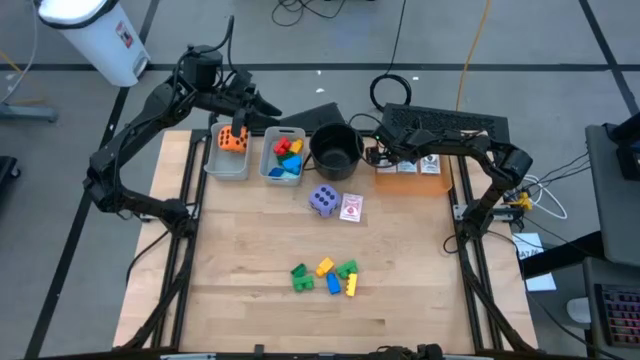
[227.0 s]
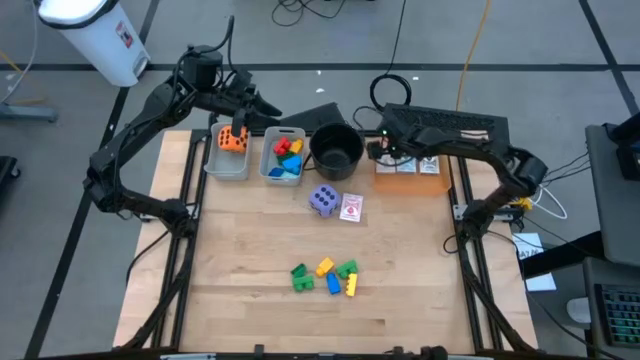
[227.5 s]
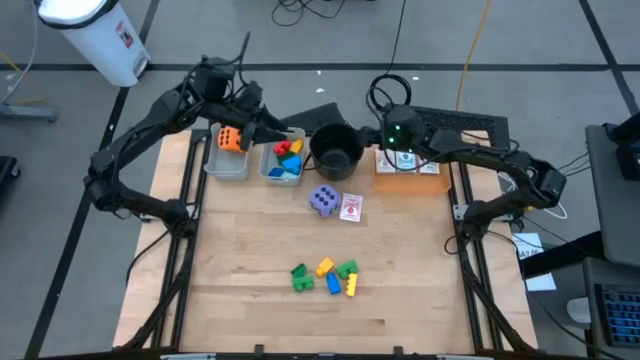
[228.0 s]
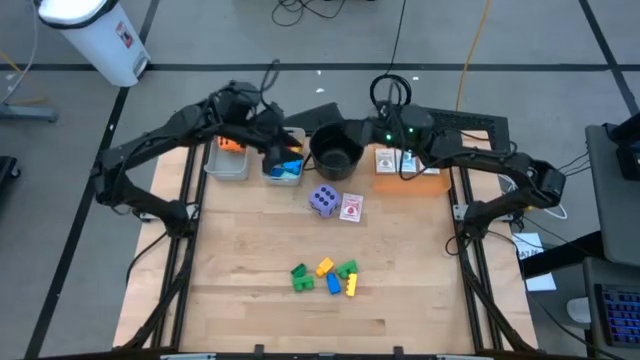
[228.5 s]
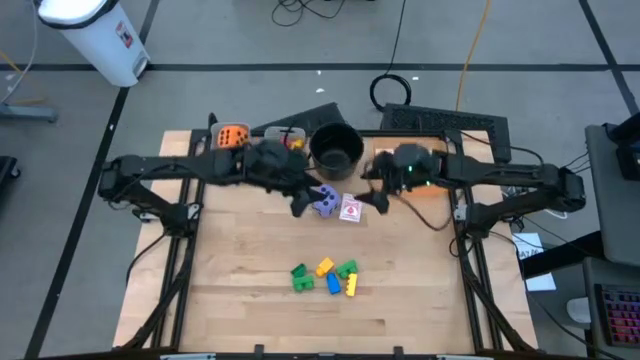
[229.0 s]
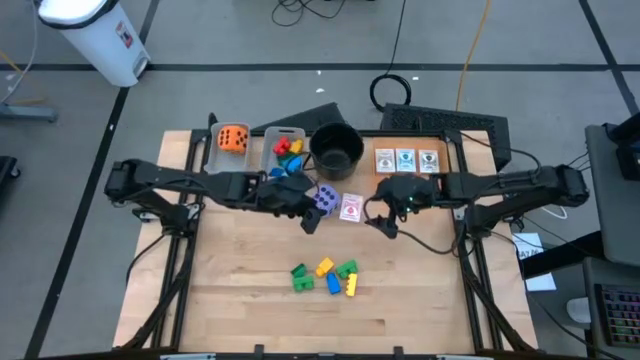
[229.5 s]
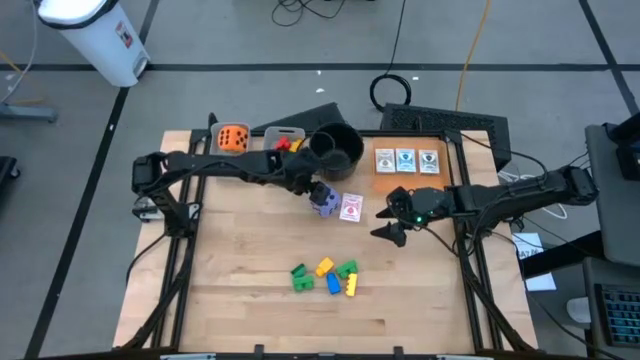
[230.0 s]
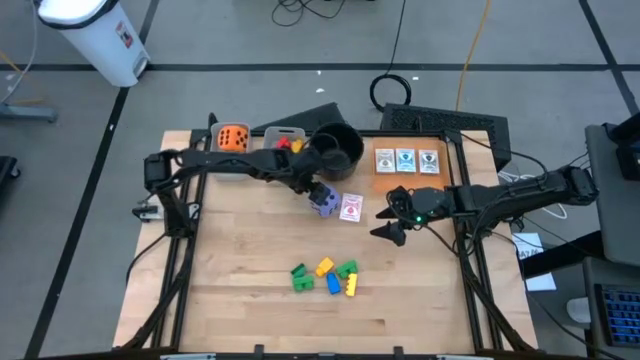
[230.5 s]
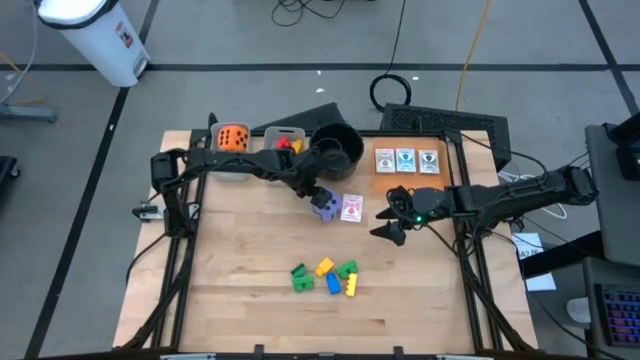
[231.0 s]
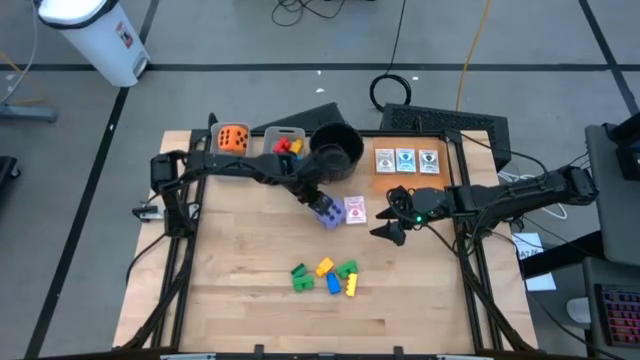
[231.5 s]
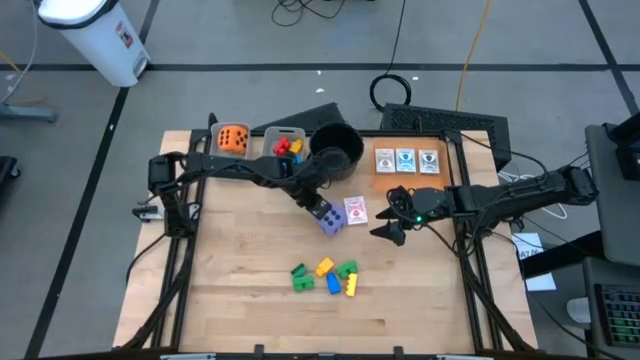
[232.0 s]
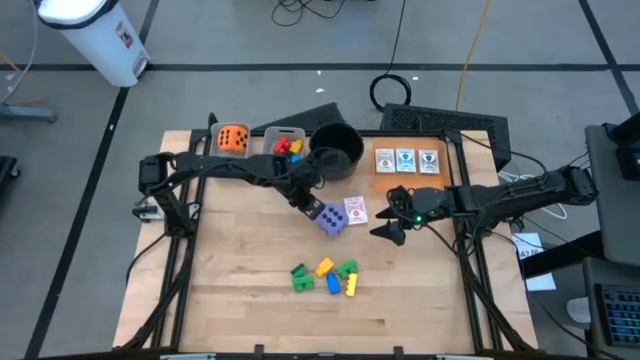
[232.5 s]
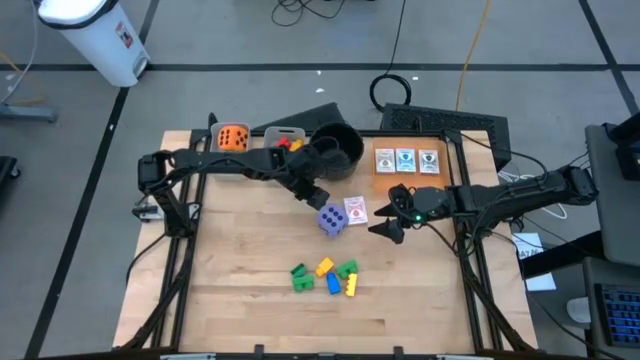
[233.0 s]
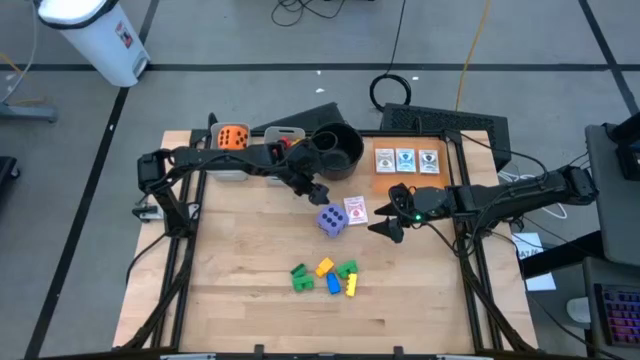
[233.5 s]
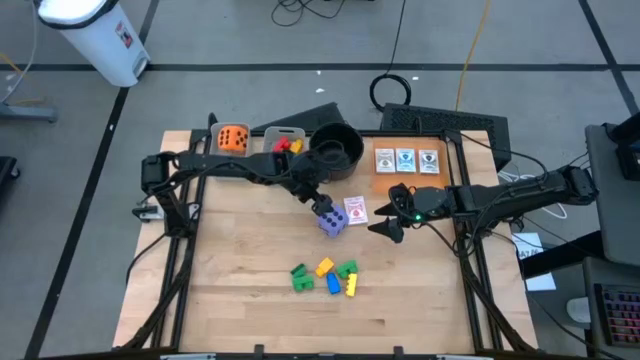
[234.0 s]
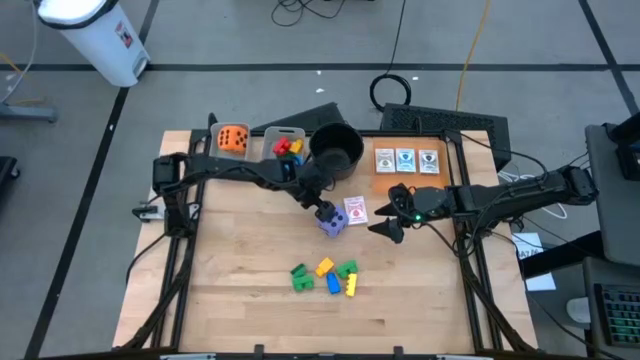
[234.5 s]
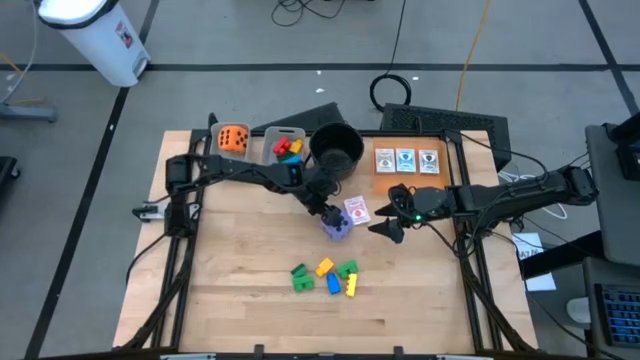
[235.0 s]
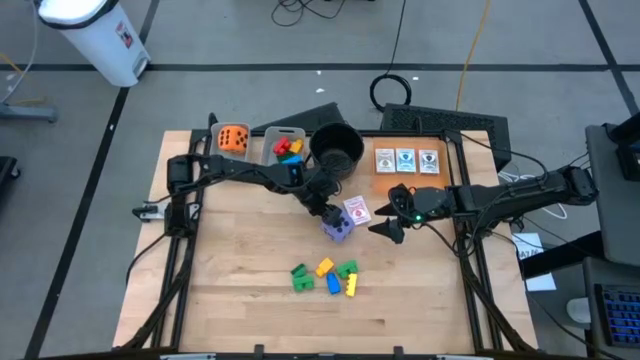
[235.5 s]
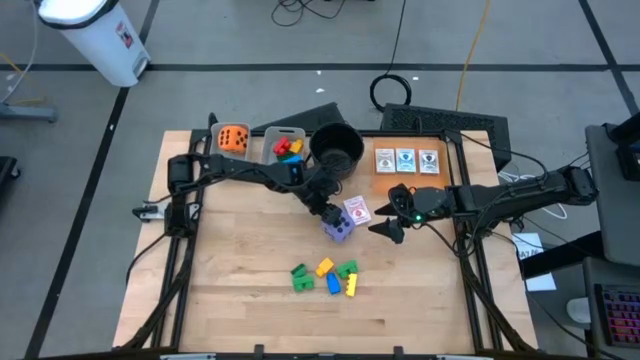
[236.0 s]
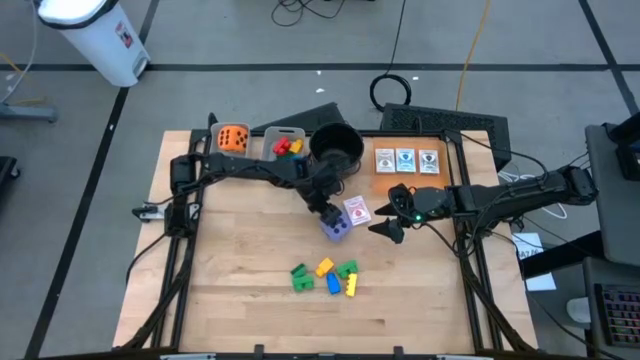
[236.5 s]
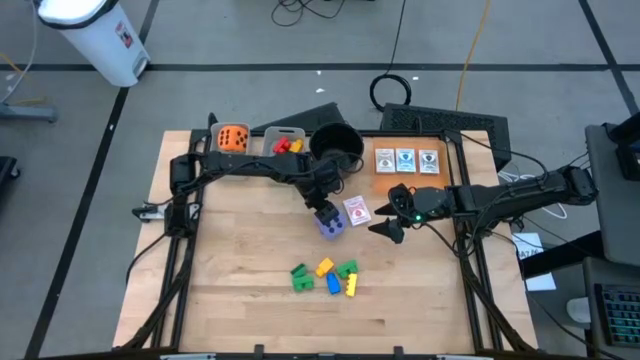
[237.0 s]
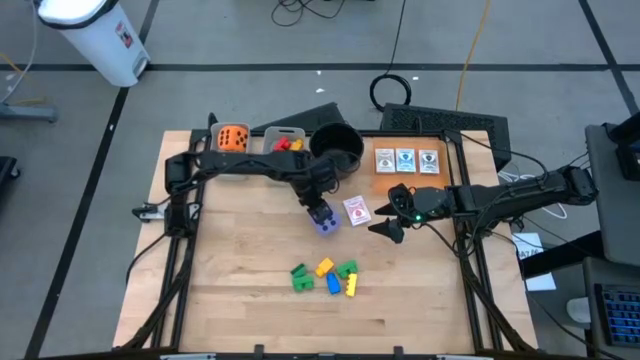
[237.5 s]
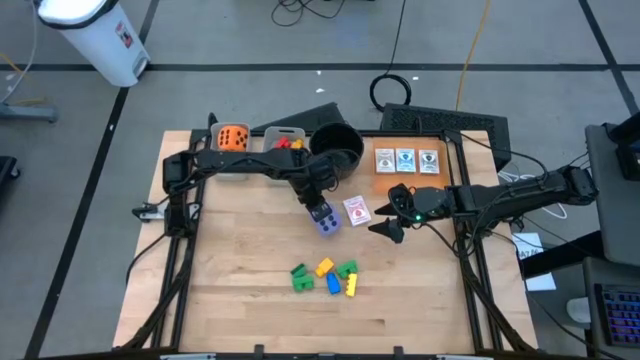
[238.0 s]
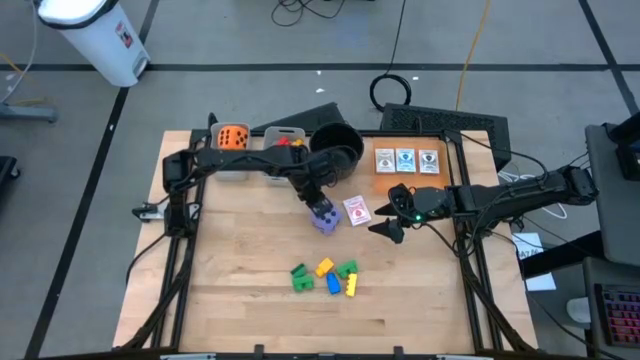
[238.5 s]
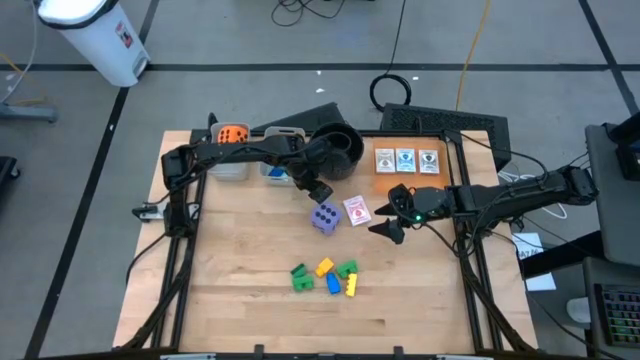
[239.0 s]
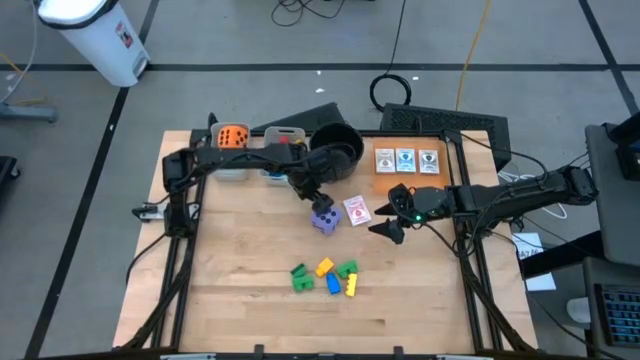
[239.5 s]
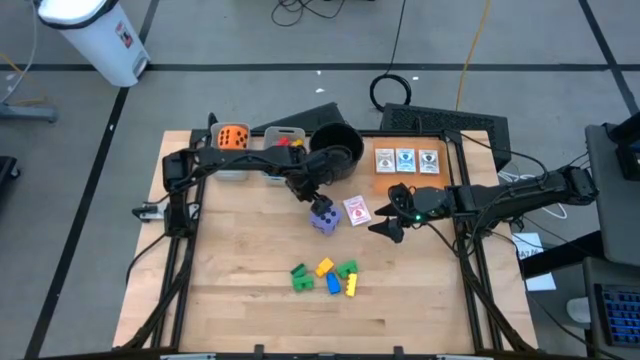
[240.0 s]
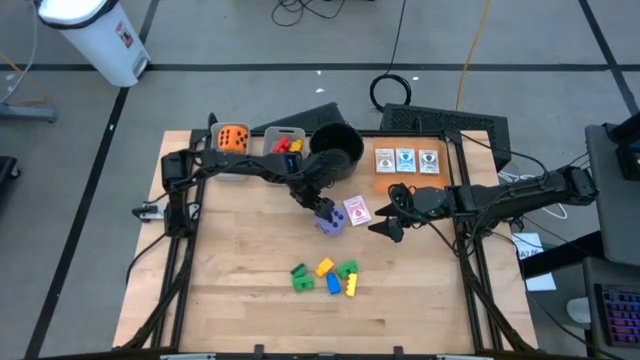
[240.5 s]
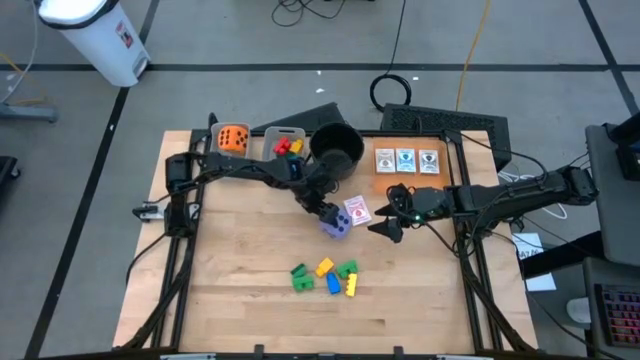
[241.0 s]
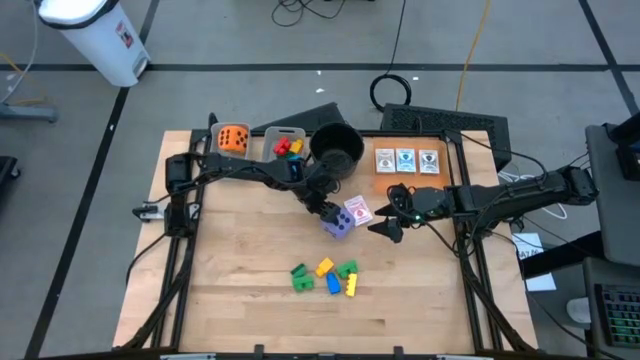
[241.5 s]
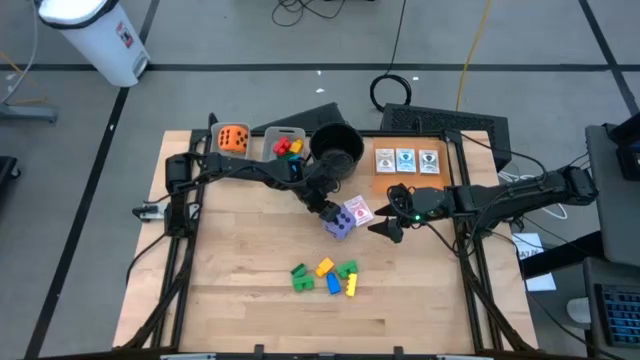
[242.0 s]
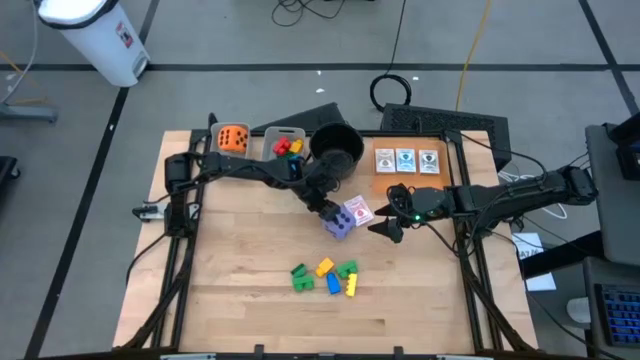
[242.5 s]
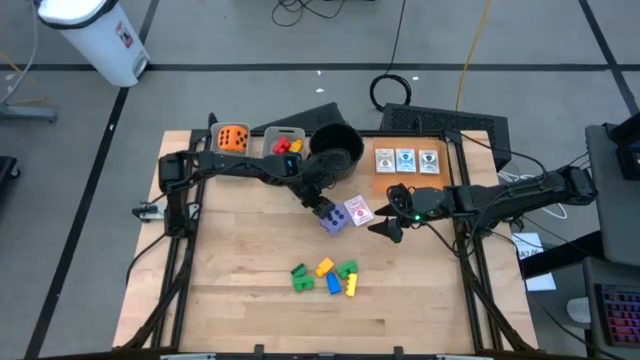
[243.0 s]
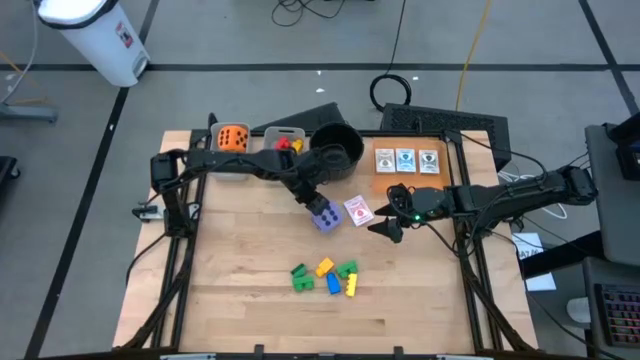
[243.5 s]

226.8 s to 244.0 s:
Task: Pick & Place Toys
Put the purple die into the left gray bin

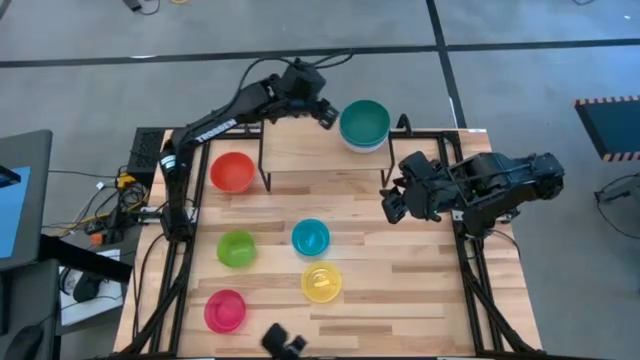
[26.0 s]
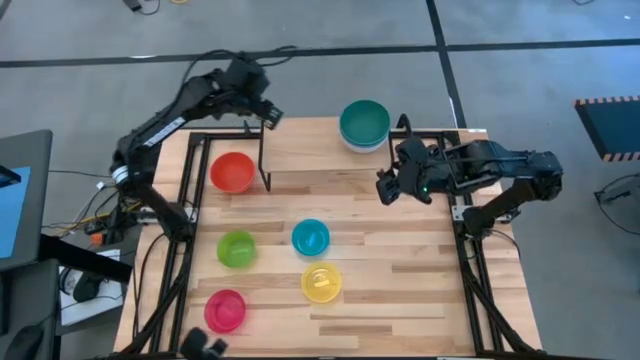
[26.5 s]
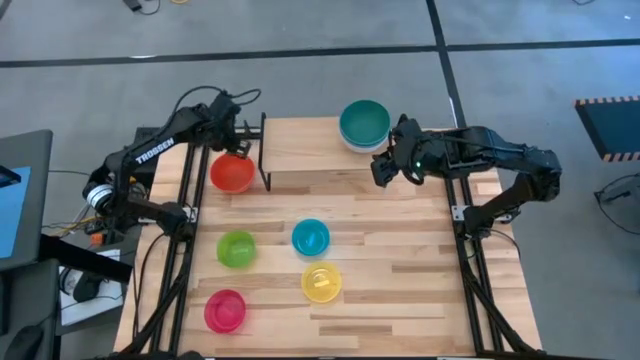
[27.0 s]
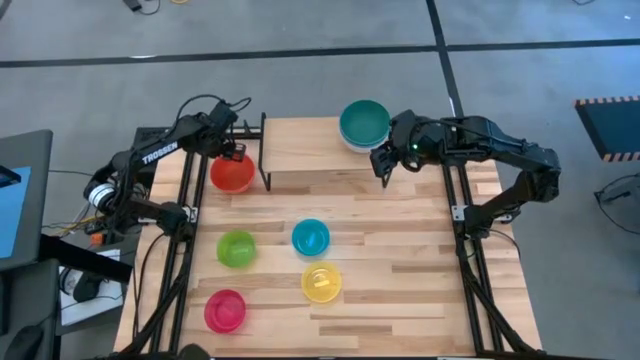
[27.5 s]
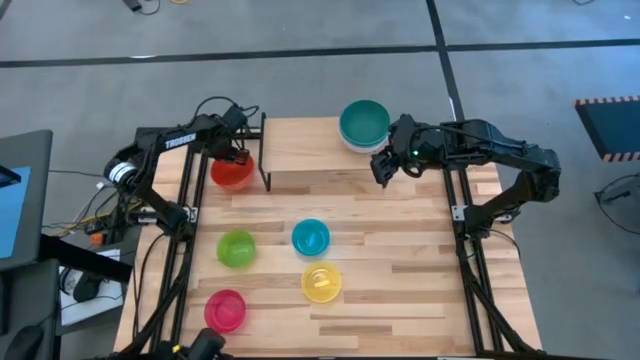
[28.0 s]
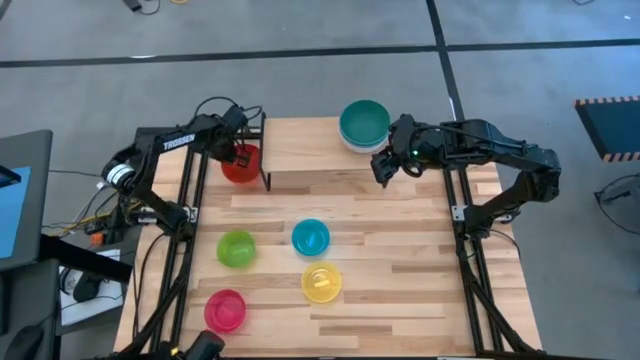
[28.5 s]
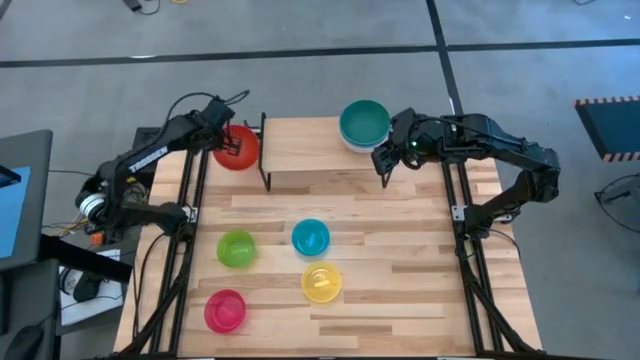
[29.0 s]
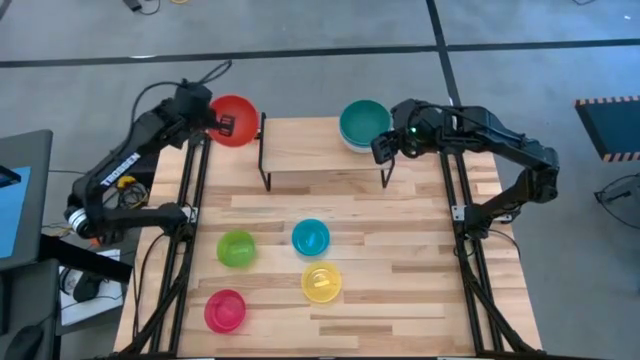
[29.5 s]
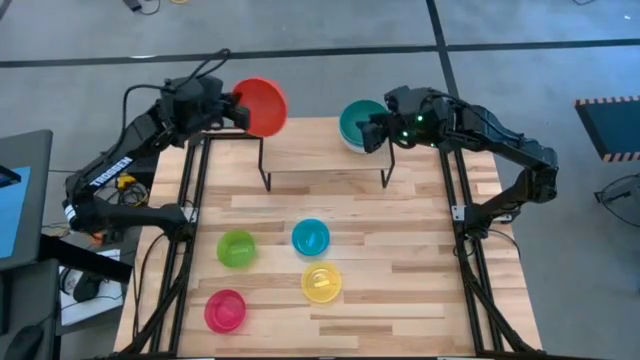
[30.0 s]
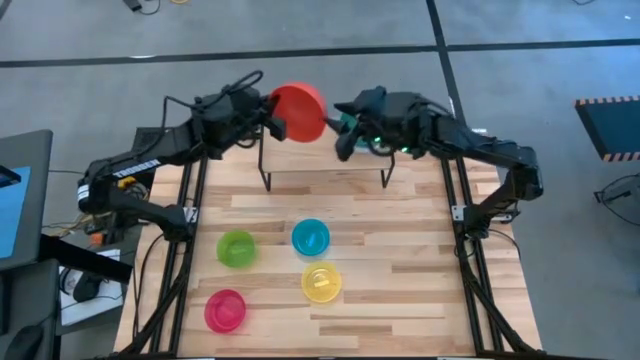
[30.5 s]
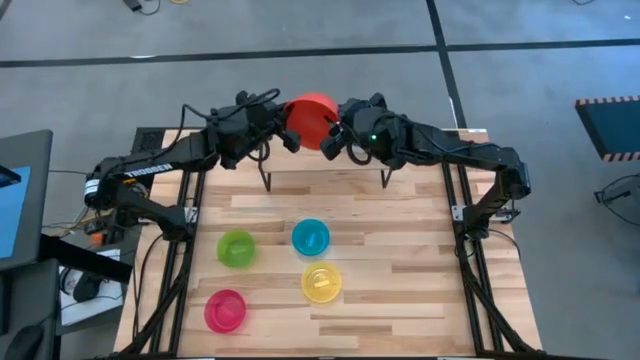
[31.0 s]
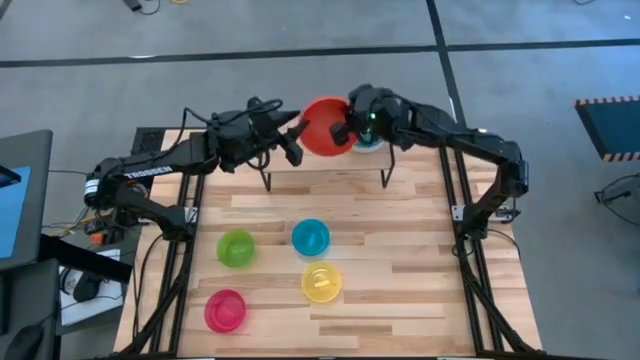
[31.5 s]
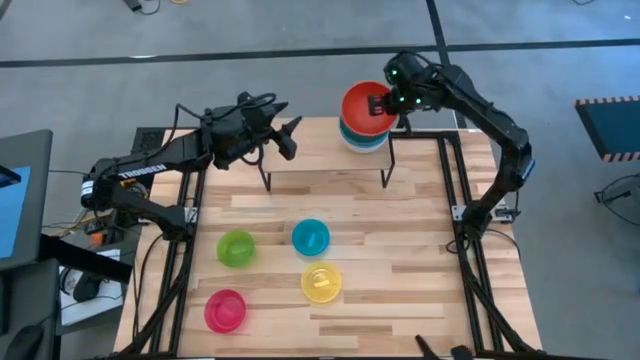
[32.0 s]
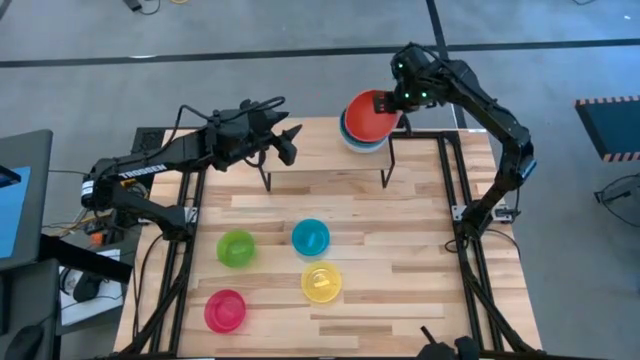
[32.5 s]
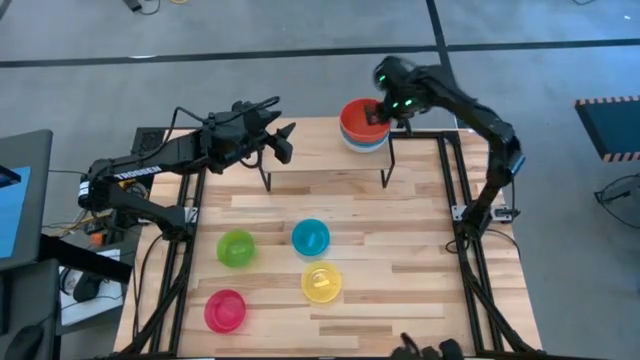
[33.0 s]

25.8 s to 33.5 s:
Task: Place and stack bowls onto a shelf
Stack the large orange bowl on top of the large green bowl on the shelf
